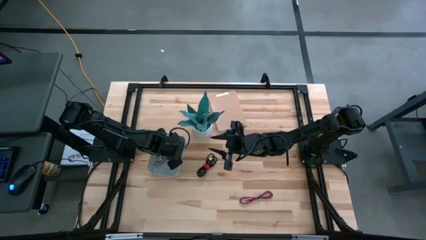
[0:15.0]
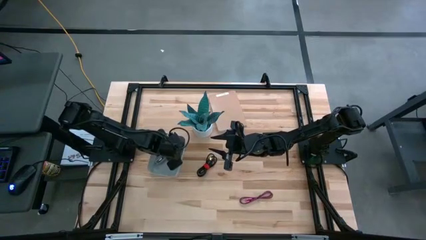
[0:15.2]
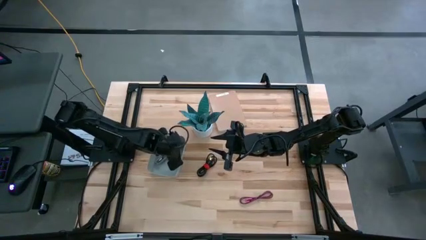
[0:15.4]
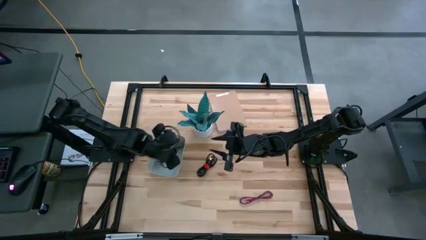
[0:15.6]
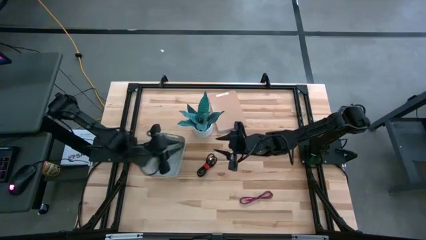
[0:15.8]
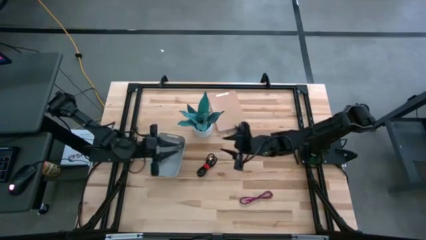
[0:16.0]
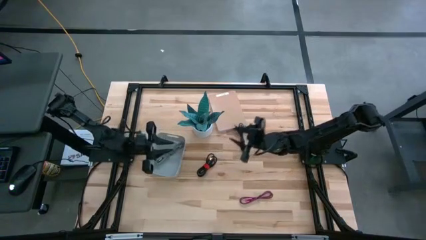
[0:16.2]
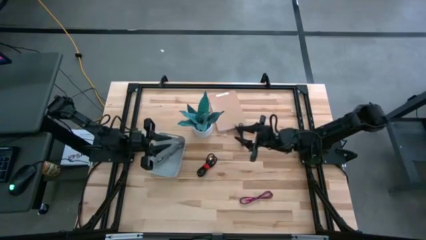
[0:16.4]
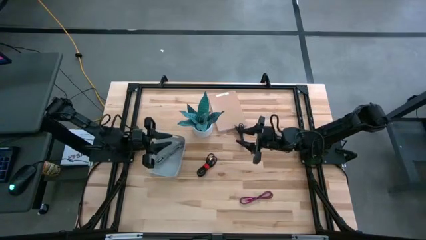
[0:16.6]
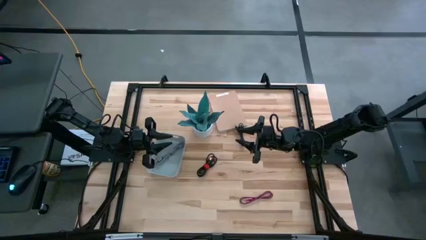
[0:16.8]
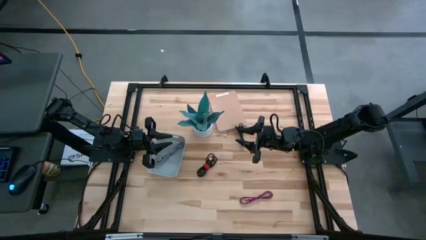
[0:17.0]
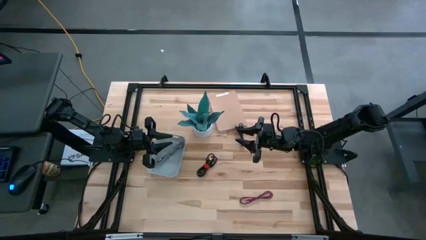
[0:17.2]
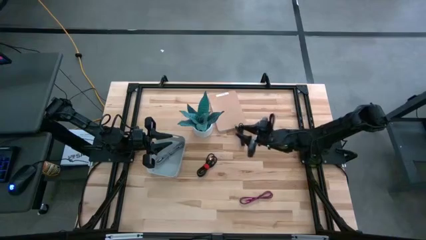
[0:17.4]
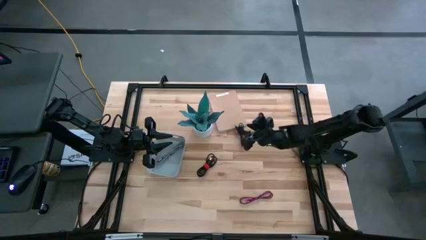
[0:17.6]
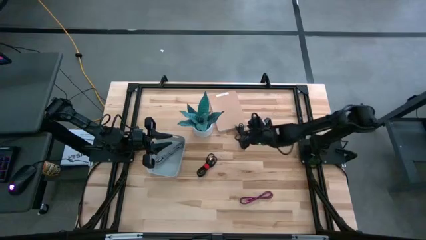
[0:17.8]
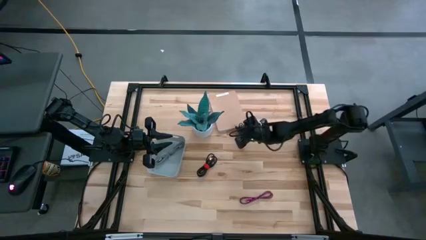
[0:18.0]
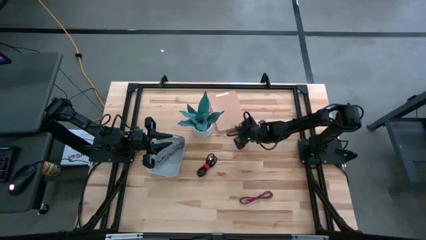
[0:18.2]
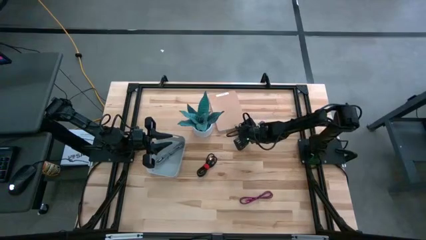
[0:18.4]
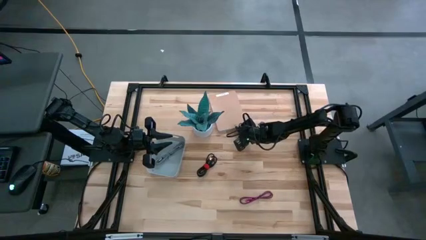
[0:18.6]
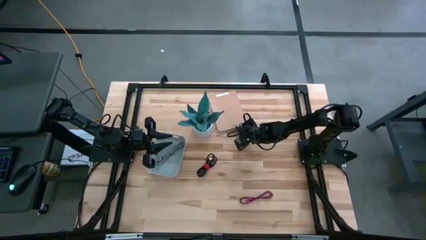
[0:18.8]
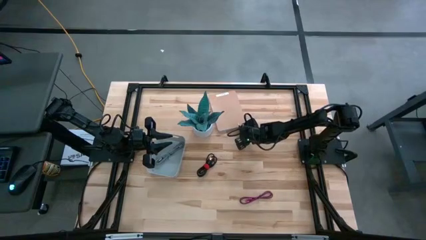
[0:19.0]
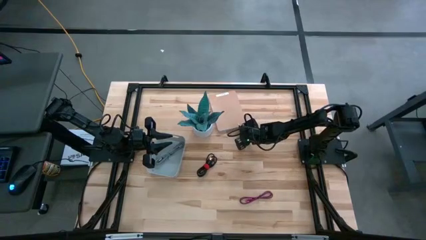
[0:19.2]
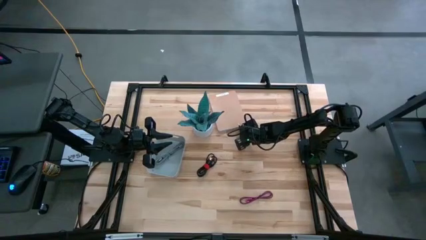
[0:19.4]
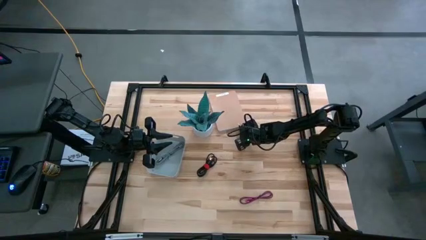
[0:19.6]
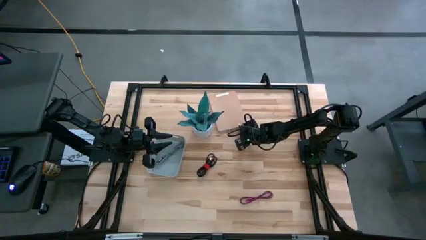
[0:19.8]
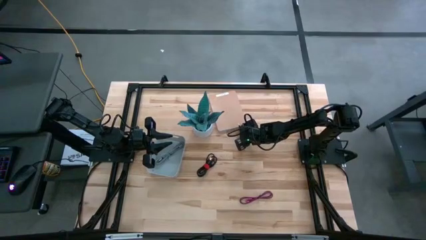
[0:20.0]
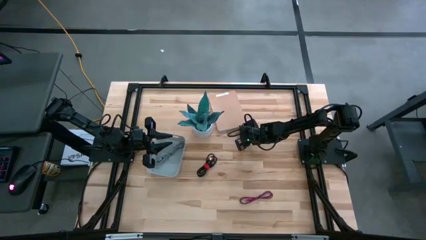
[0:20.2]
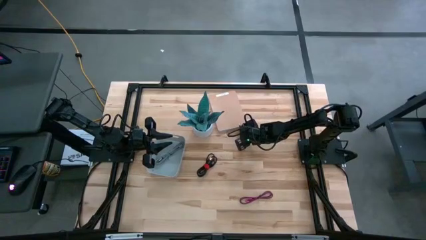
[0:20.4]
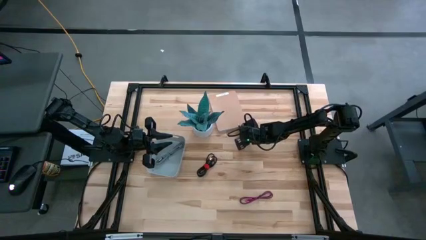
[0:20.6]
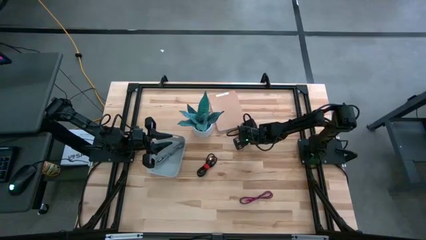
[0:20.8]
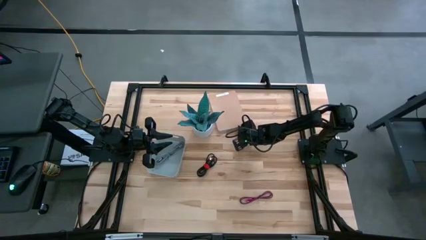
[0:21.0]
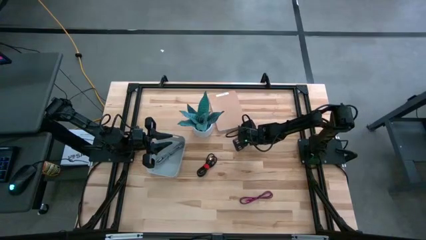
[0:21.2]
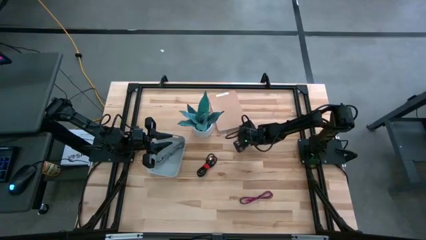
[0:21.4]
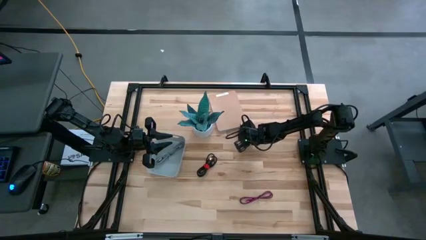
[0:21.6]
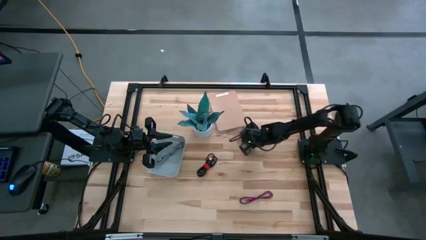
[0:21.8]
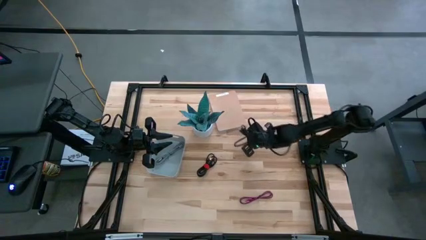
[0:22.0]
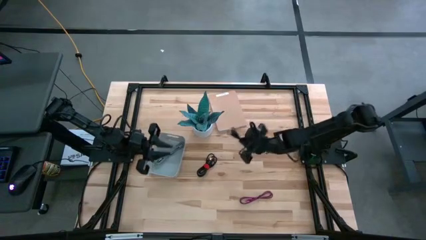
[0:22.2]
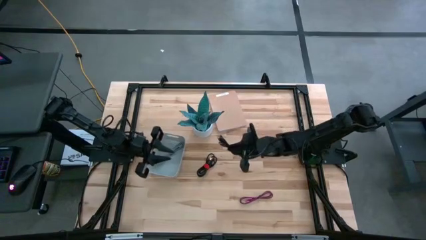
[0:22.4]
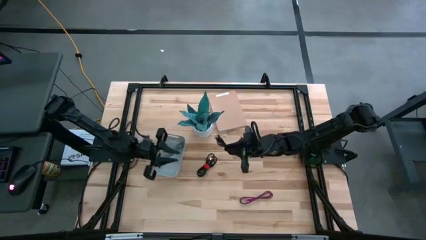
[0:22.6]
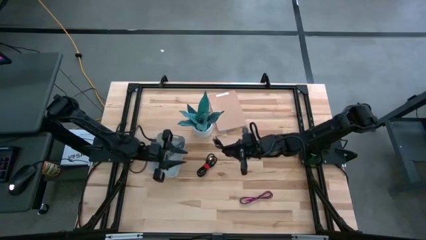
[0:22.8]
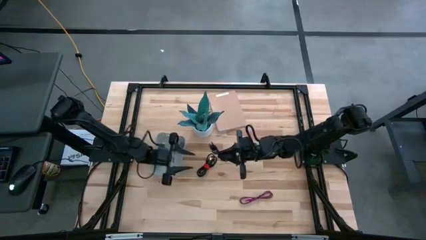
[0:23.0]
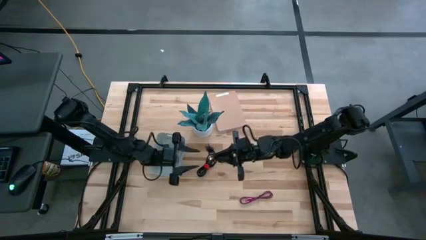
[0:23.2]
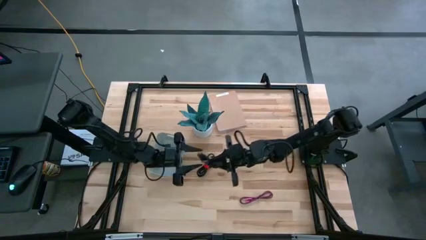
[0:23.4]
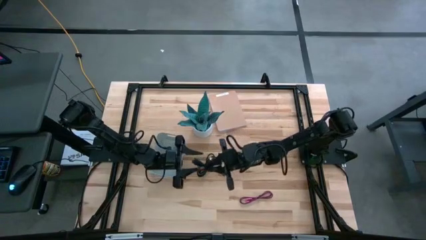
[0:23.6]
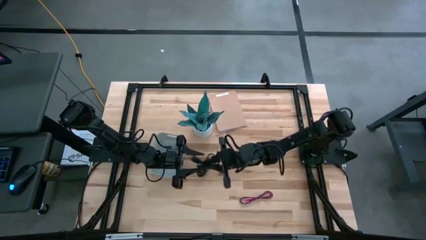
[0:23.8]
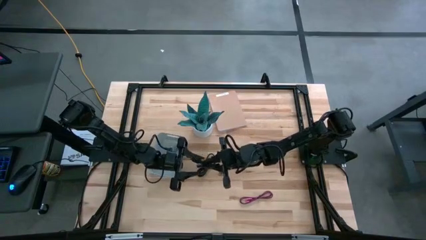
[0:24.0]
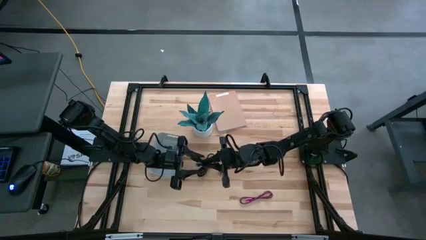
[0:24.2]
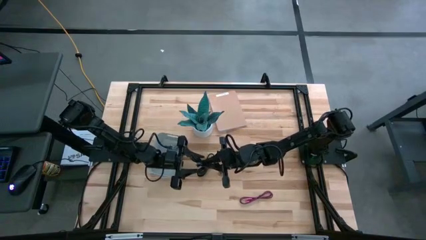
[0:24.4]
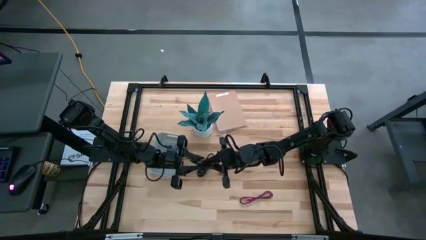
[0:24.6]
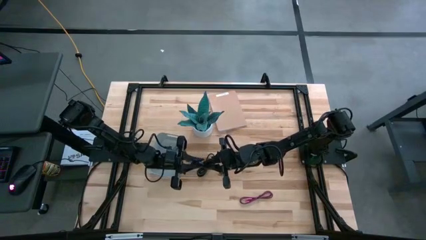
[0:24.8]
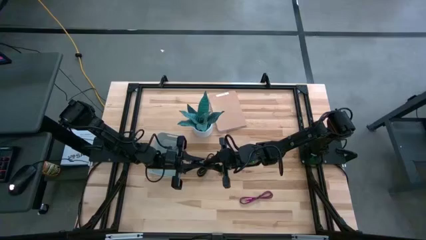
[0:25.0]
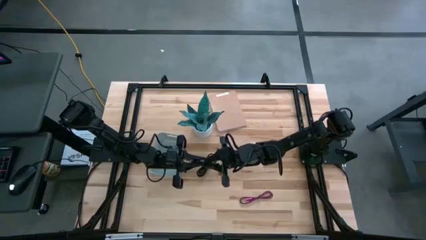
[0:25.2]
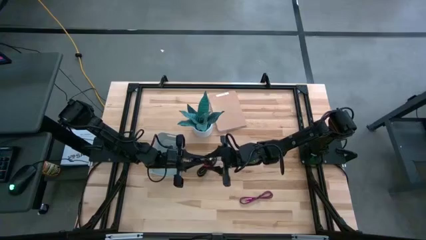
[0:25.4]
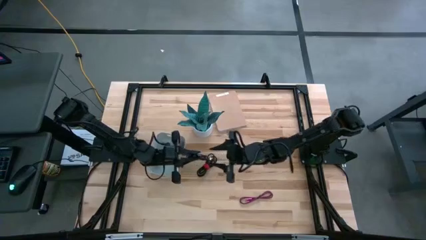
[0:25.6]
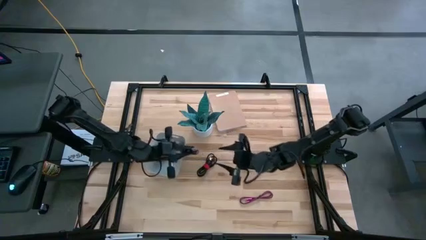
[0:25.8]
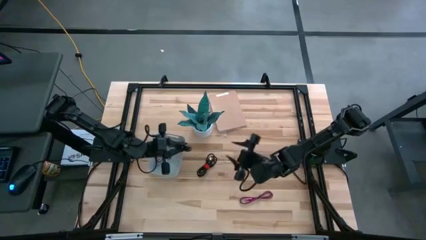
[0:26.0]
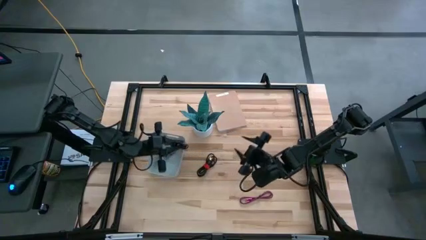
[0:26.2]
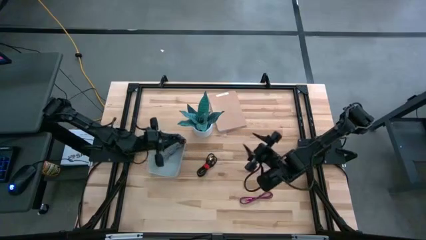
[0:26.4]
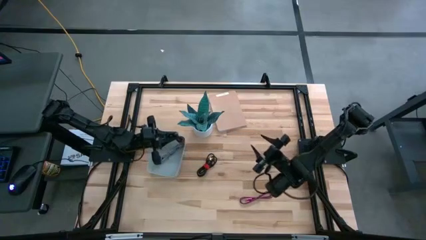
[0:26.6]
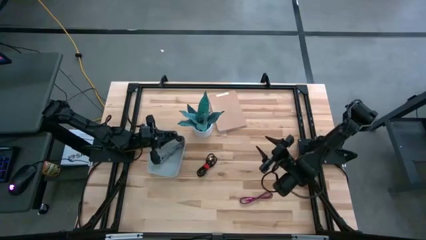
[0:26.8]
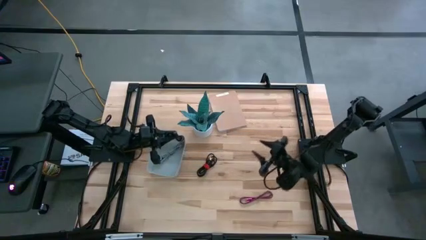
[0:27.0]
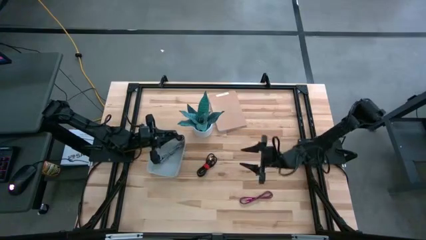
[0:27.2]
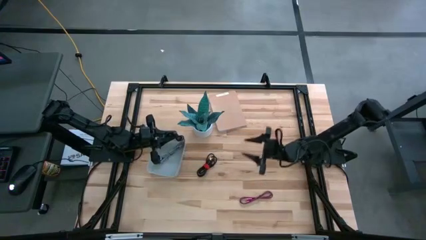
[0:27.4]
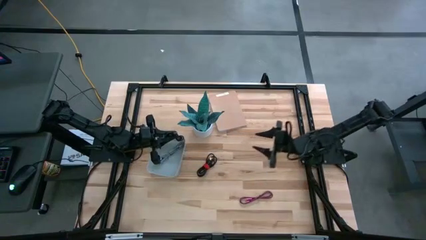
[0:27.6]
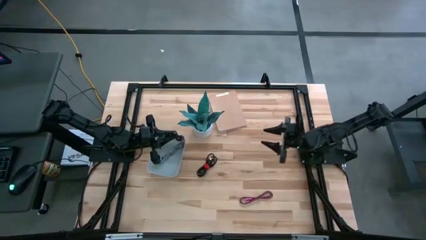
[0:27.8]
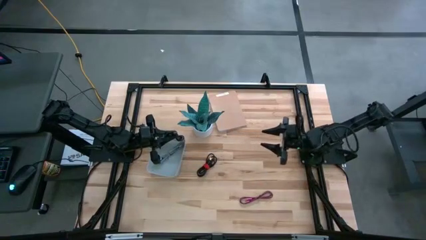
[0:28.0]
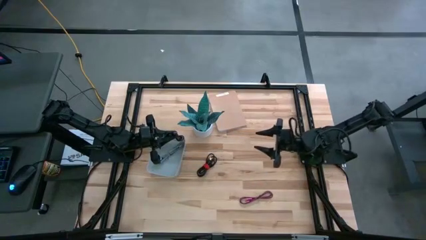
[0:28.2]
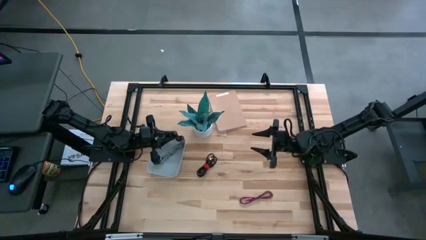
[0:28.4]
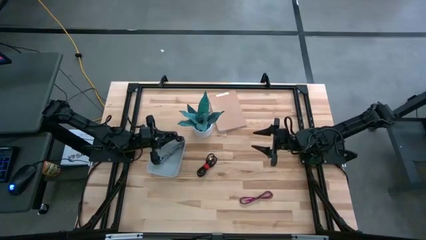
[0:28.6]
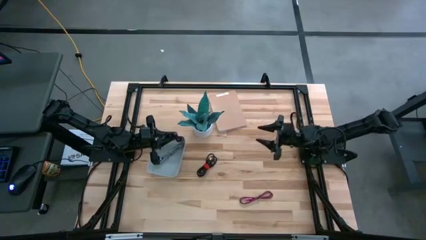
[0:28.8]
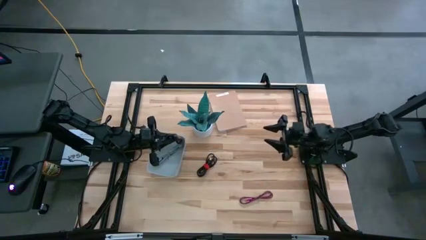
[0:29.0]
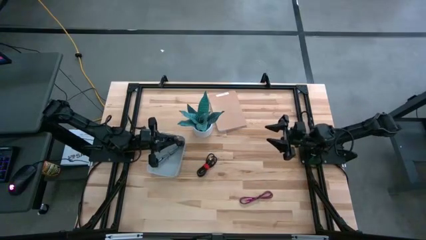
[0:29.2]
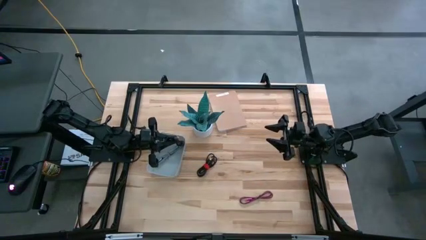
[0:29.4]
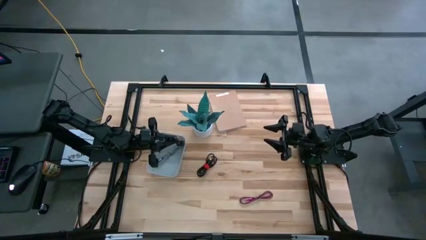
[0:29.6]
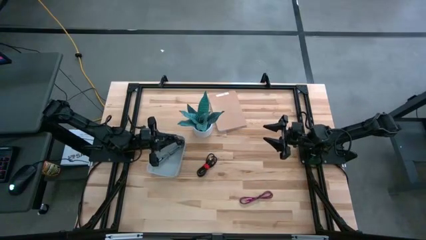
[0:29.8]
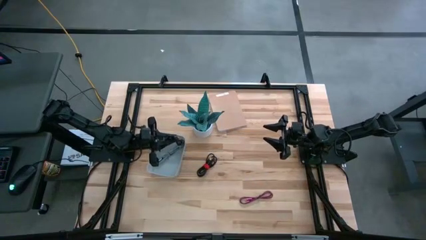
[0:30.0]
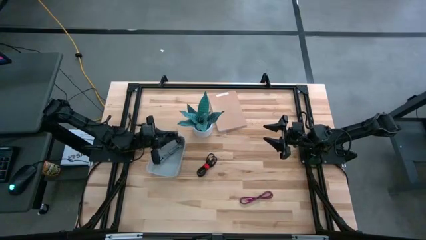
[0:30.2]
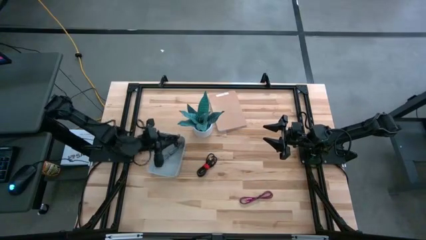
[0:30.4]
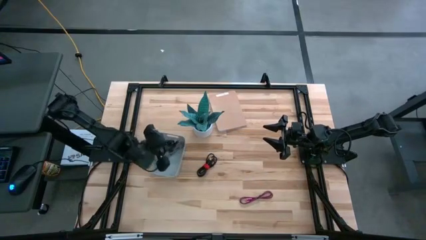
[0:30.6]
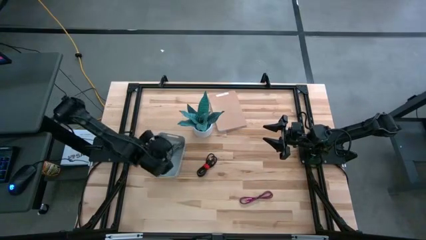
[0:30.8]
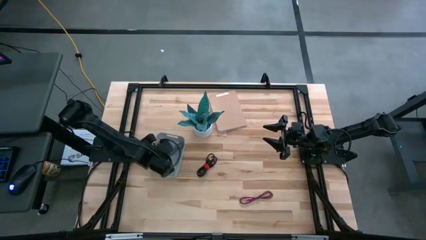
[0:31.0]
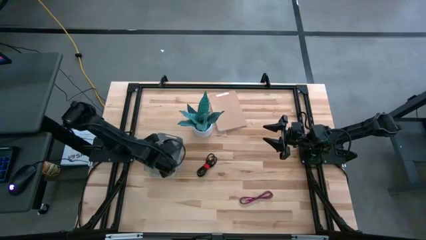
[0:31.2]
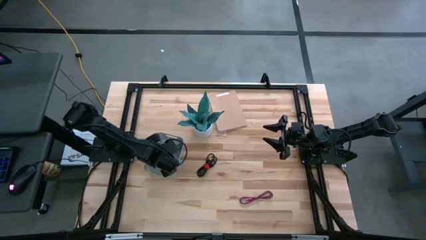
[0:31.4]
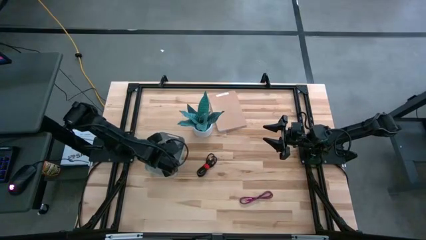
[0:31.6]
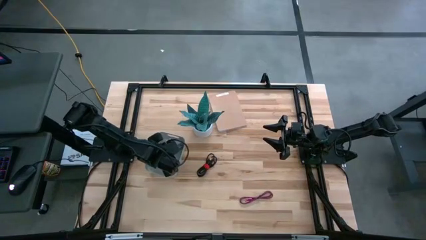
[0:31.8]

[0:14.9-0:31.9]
Task: Pick and place USB-C Cables
Put the top black charger cable into the bin
